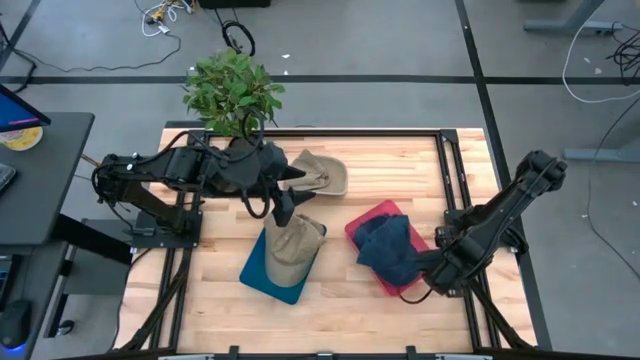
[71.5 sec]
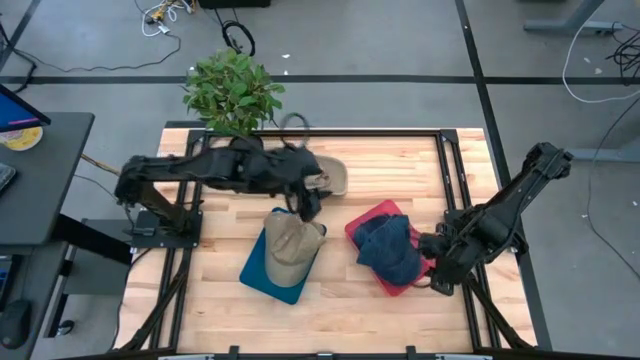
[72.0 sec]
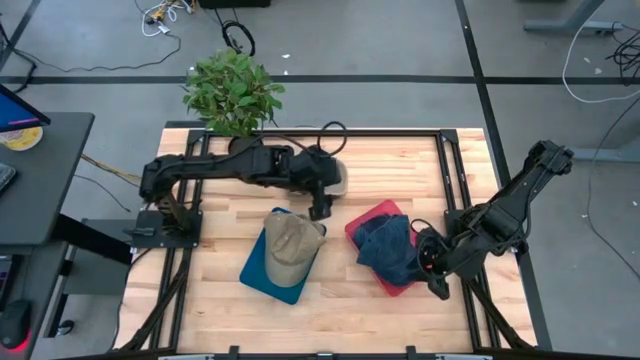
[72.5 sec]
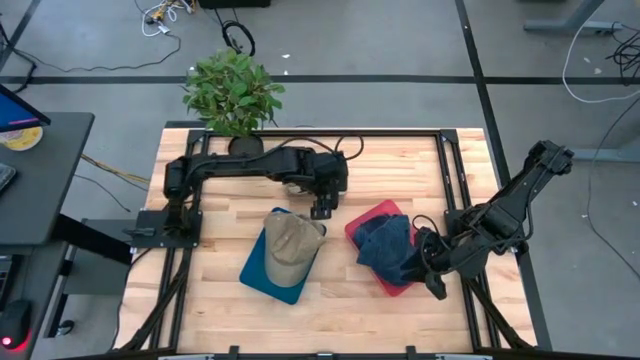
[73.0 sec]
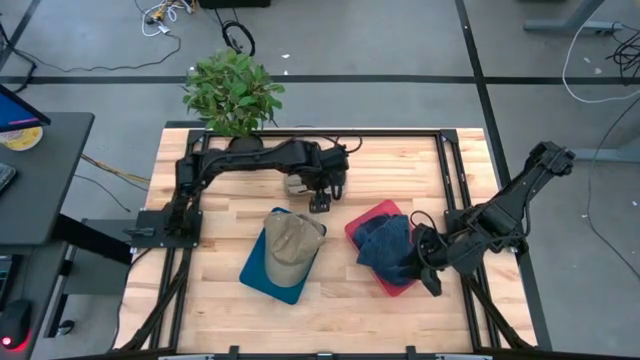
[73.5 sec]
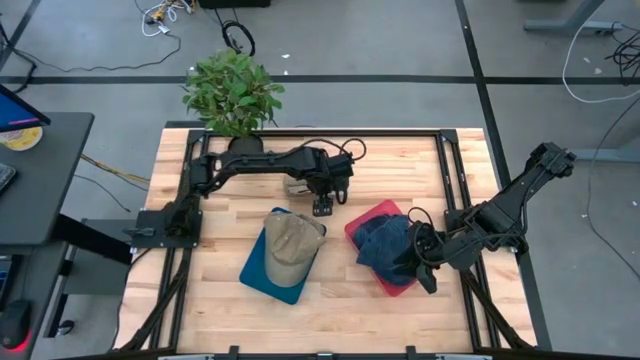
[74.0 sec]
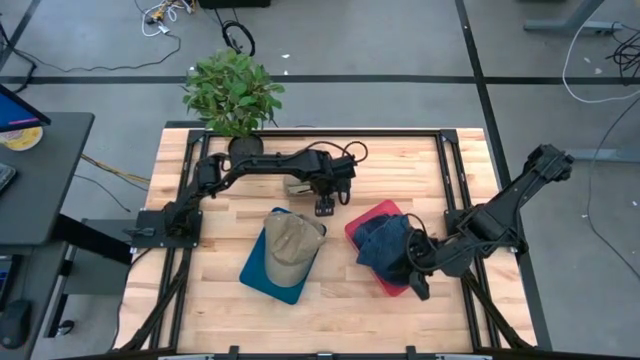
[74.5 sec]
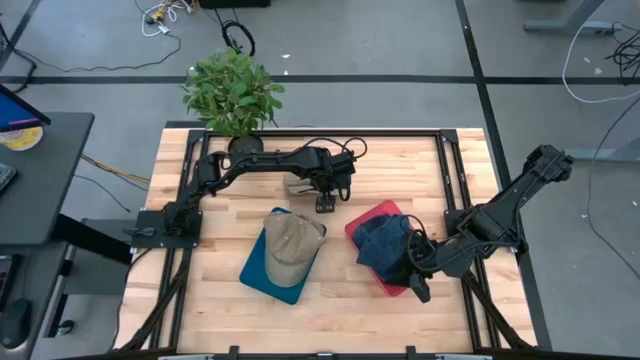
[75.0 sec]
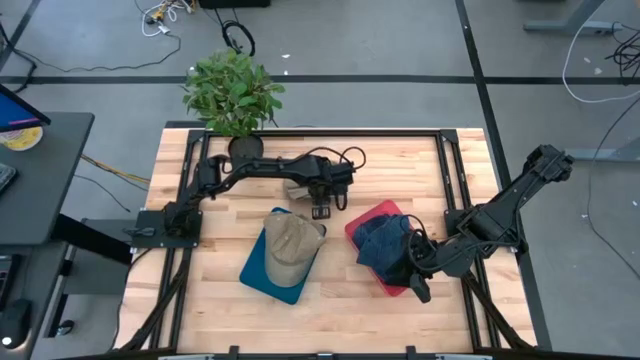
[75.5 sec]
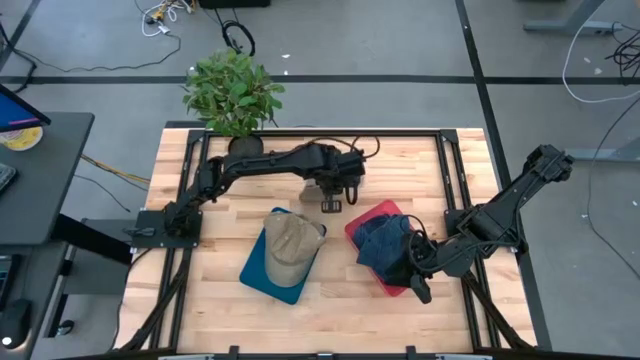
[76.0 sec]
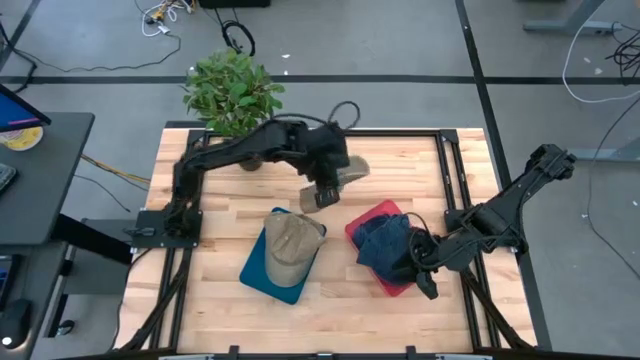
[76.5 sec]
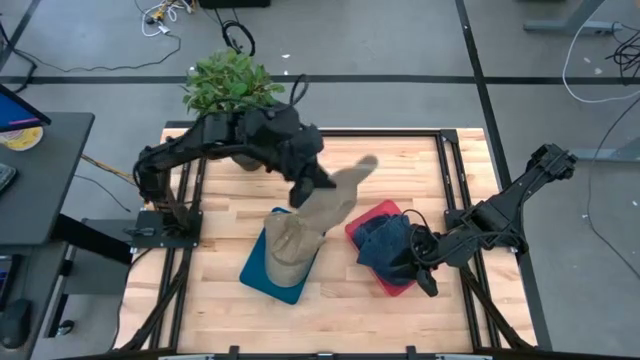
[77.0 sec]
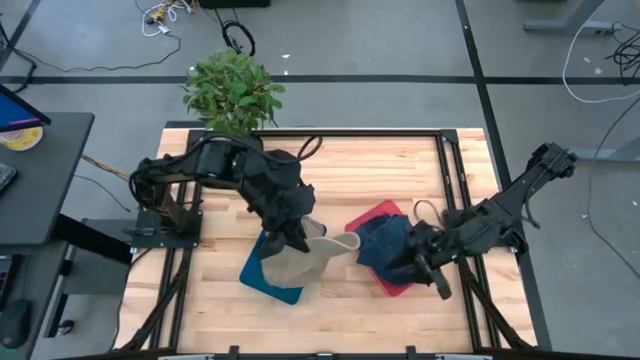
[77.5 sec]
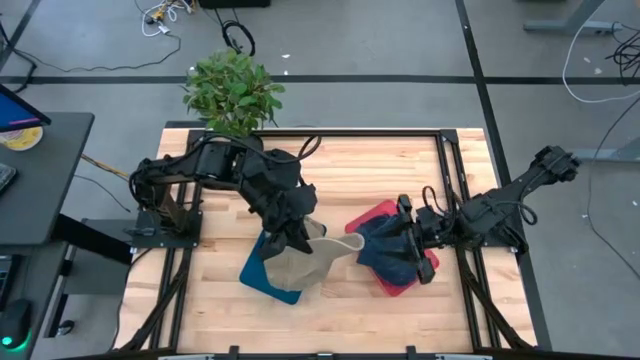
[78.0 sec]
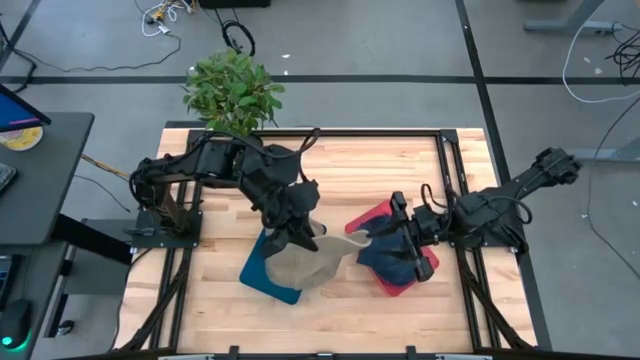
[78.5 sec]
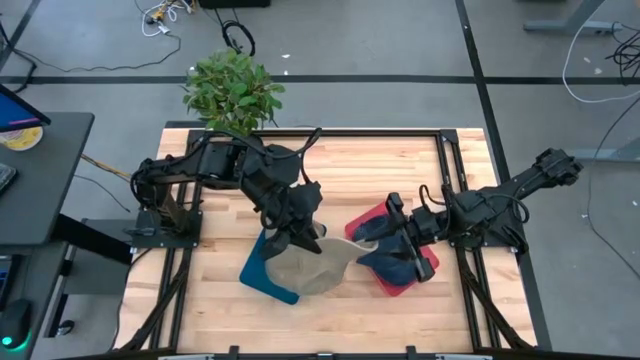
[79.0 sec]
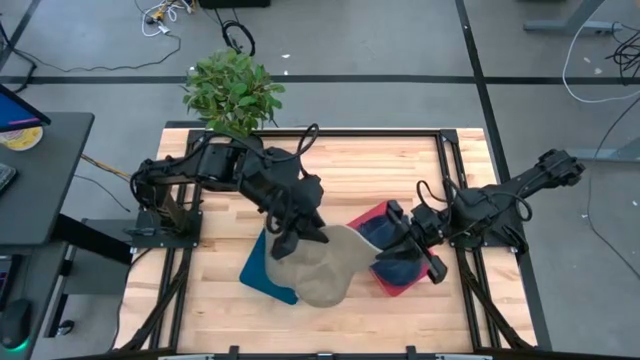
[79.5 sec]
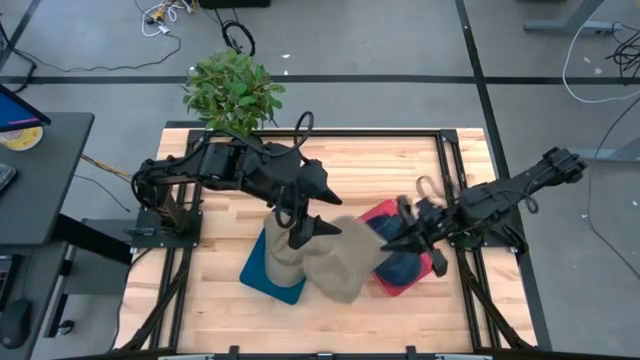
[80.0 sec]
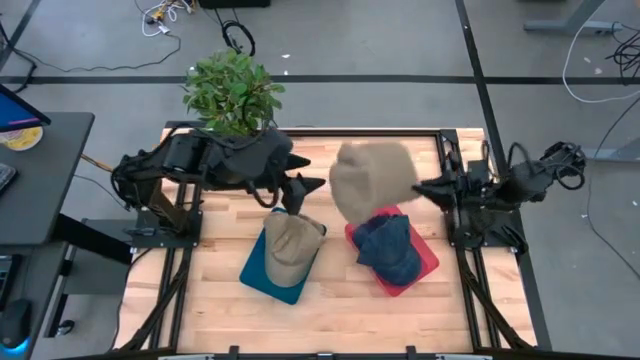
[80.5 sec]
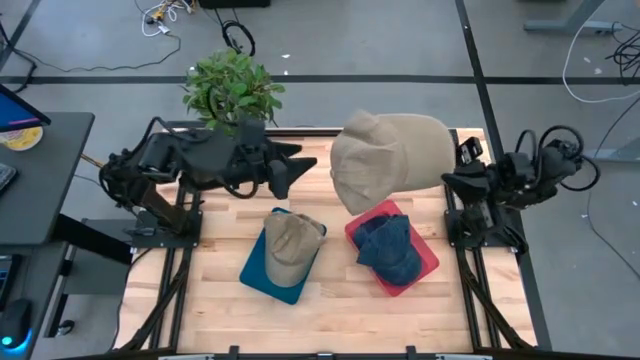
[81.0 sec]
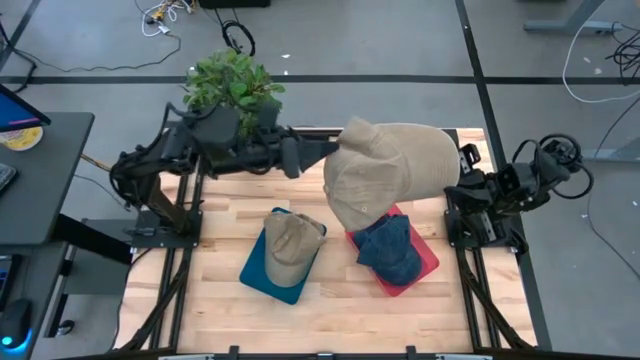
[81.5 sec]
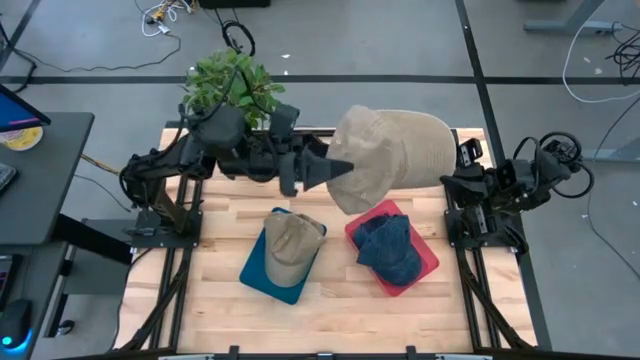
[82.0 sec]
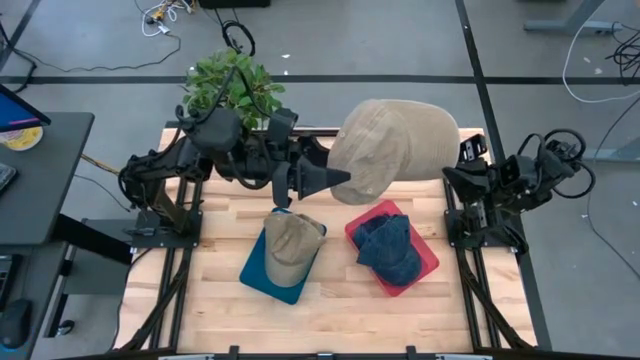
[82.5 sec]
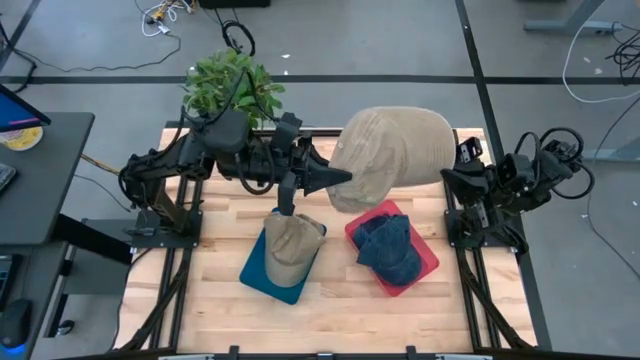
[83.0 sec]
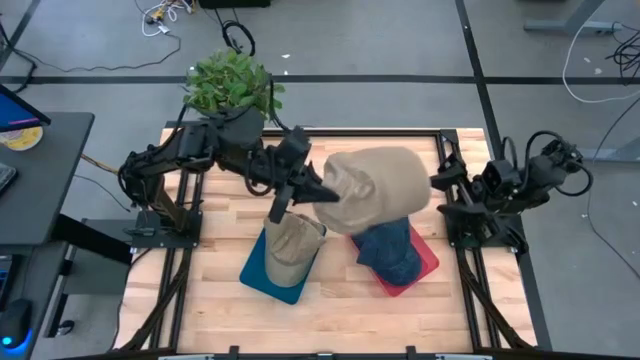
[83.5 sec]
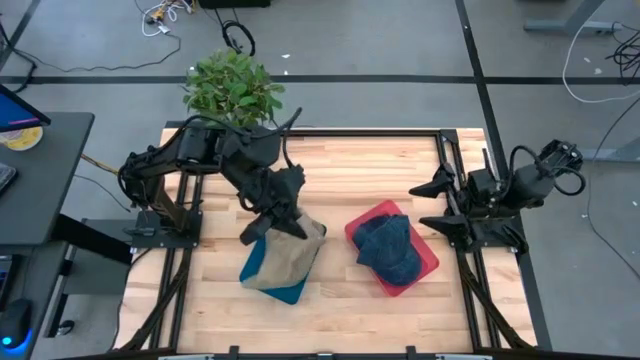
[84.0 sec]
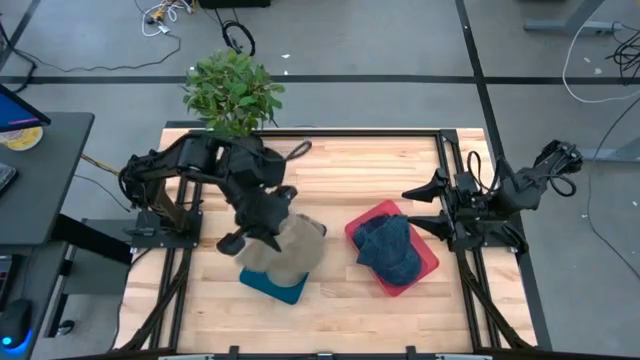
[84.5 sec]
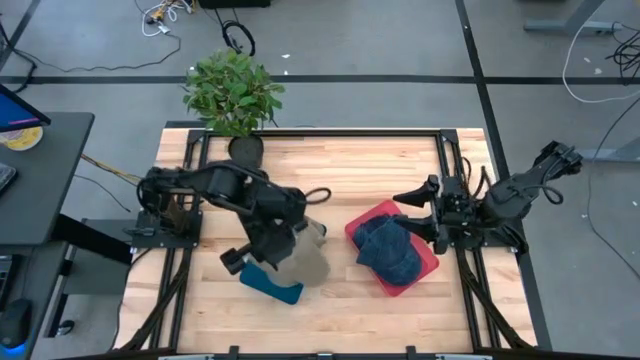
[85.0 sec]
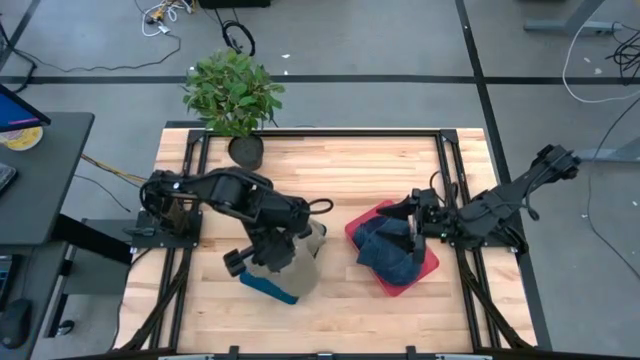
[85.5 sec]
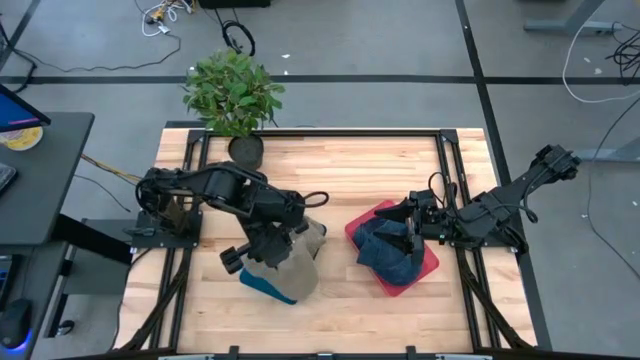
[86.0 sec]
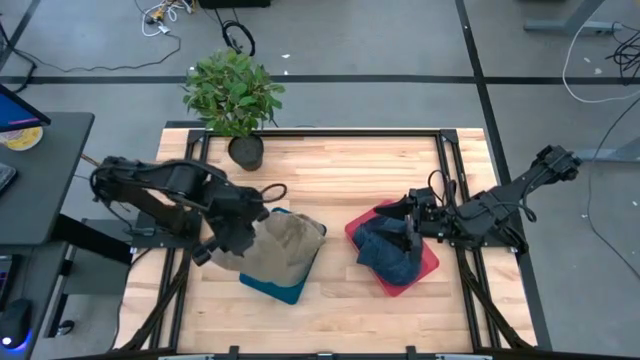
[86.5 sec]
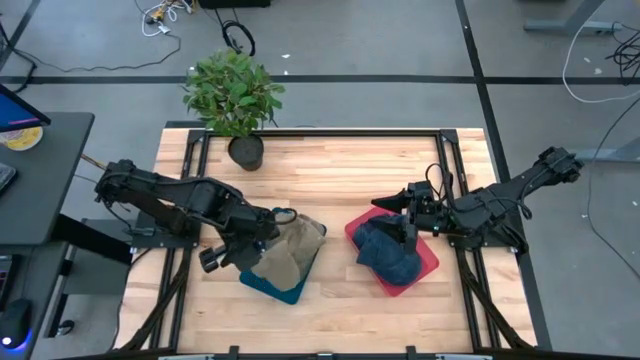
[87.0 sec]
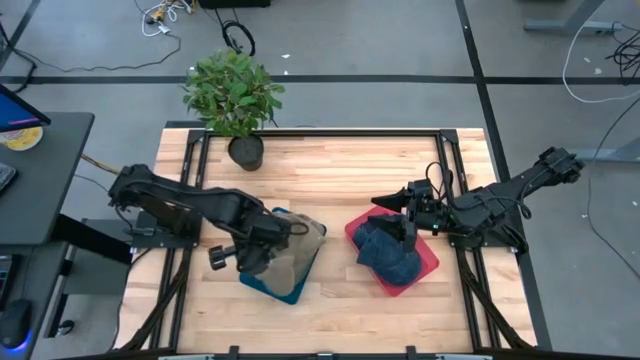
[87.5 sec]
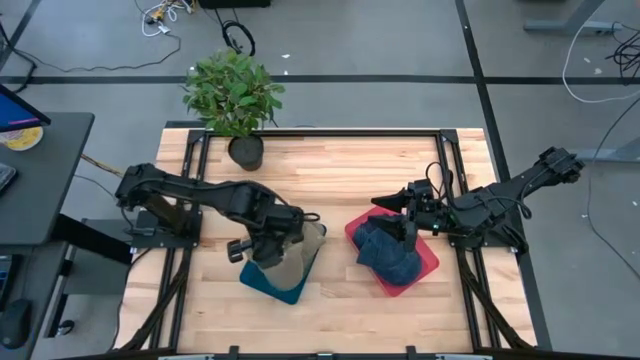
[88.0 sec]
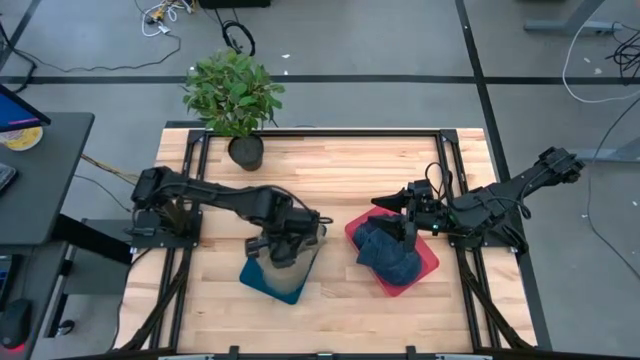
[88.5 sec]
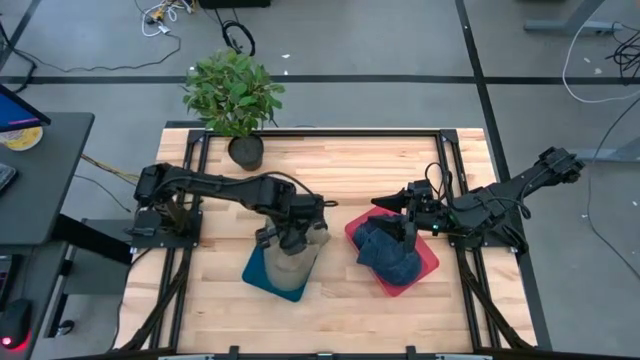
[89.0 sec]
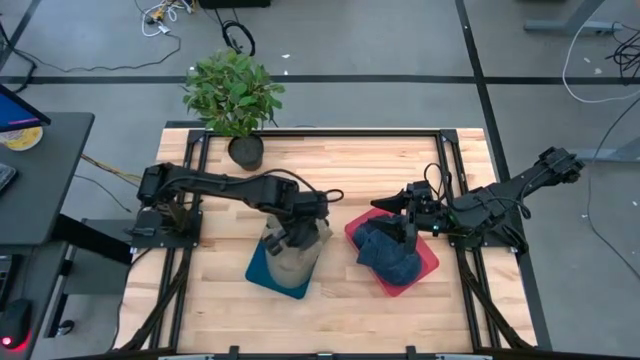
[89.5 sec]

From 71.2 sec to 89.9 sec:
Task: Pick & Place hat
Put the brown cap into the blue bin

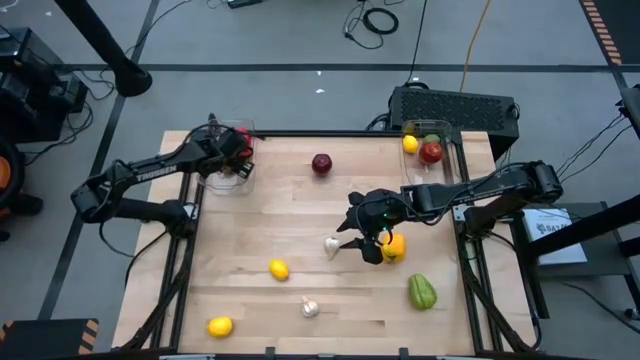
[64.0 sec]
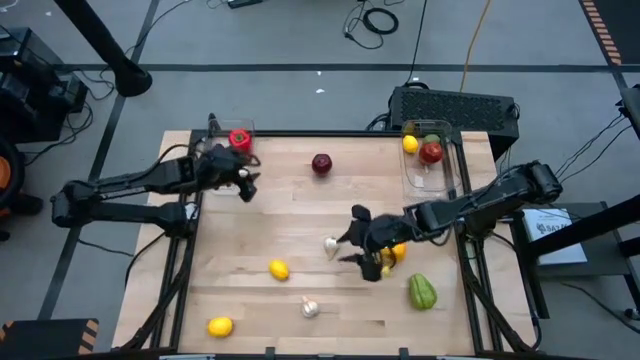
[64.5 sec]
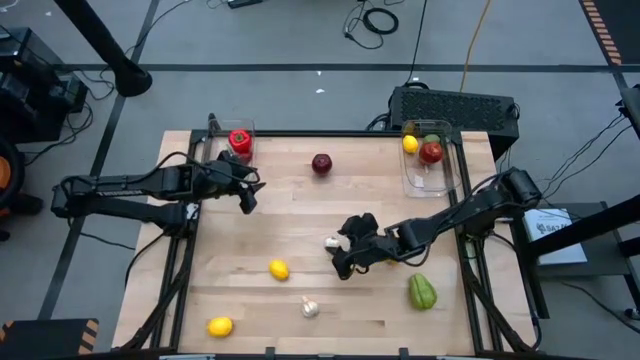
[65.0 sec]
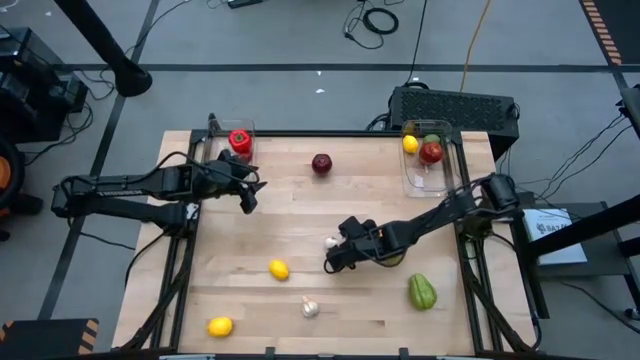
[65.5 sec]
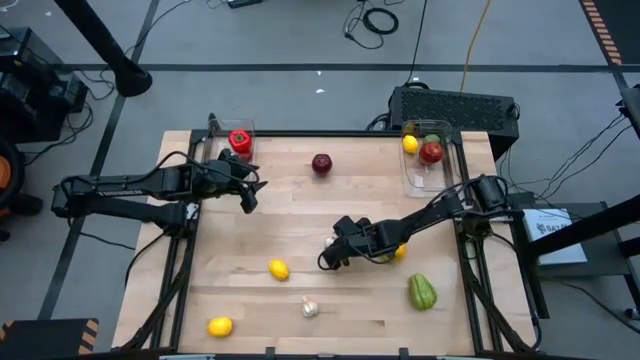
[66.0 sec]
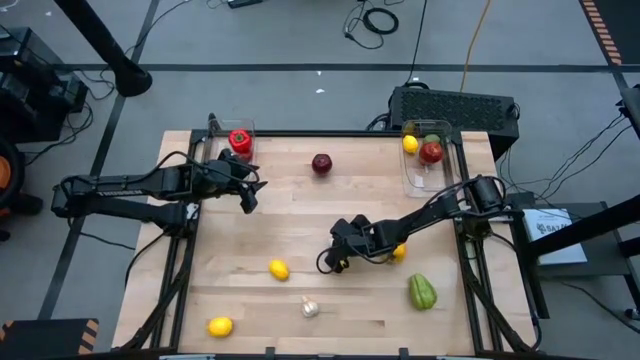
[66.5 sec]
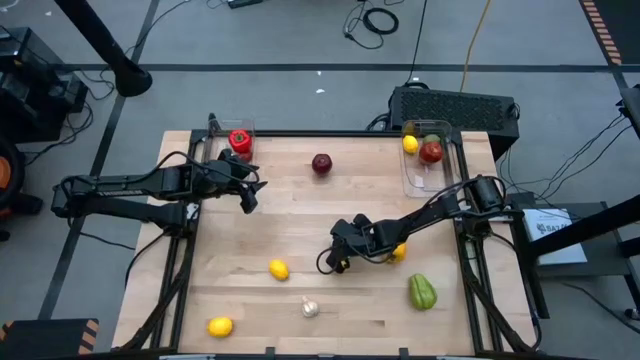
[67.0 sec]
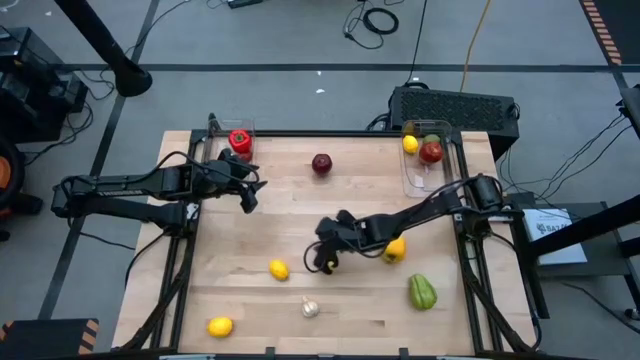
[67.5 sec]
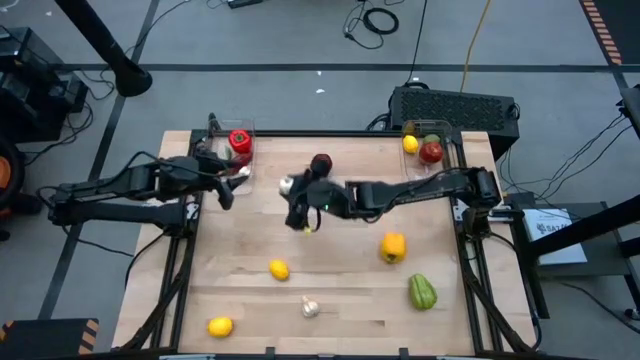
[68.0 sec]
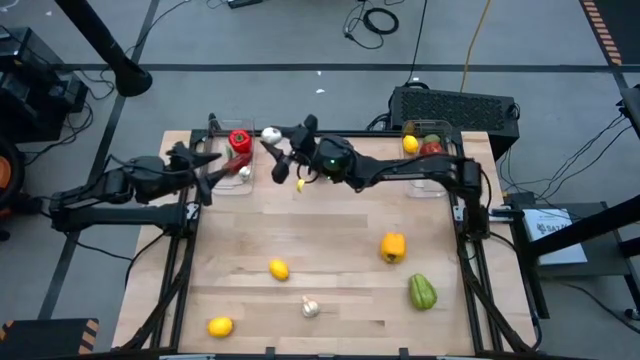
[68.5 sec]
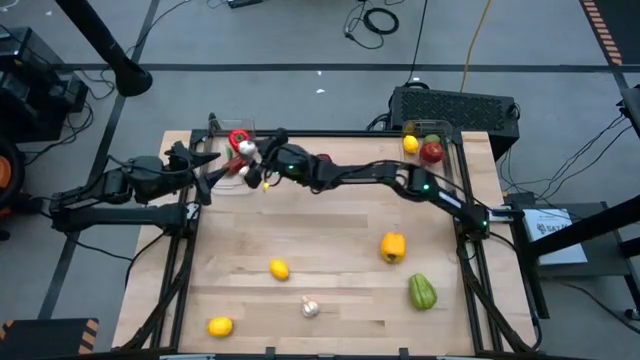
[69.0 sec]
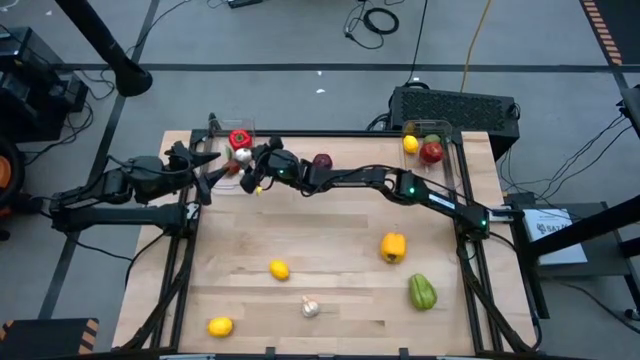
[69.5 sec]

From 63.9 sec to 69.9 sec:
Task: Sort produce into baskets
Put the top white garlic into the left transparent bin
